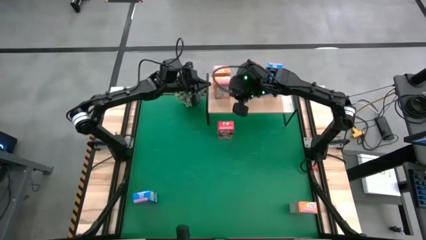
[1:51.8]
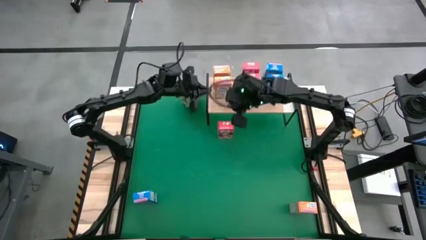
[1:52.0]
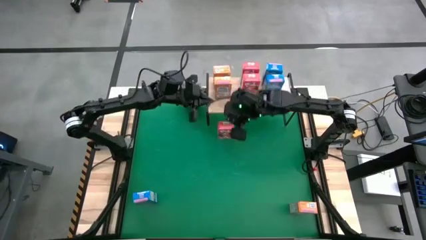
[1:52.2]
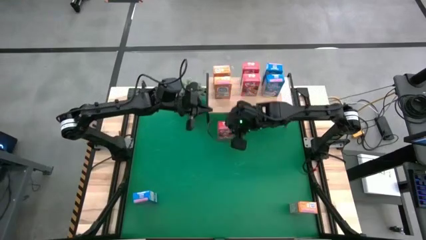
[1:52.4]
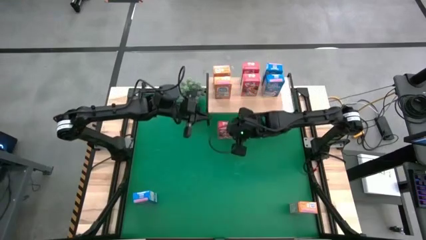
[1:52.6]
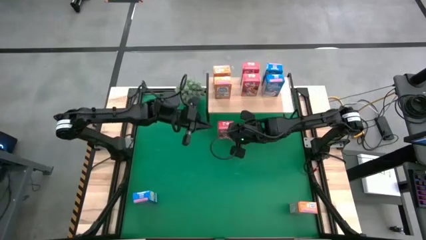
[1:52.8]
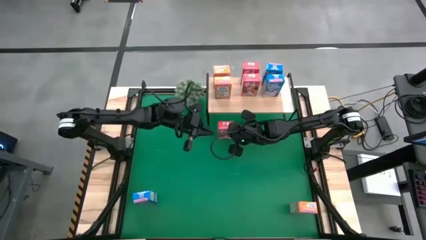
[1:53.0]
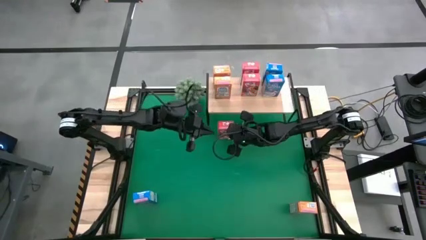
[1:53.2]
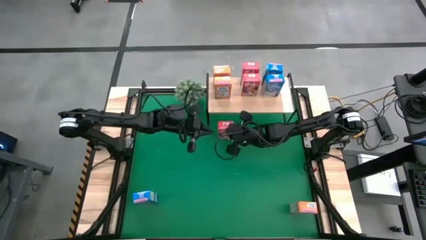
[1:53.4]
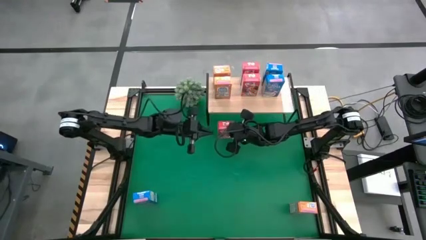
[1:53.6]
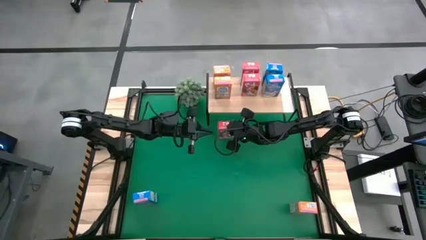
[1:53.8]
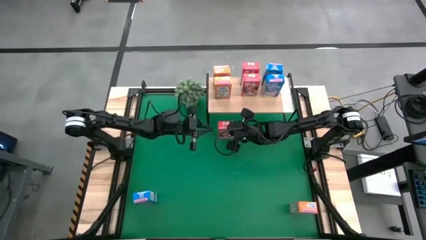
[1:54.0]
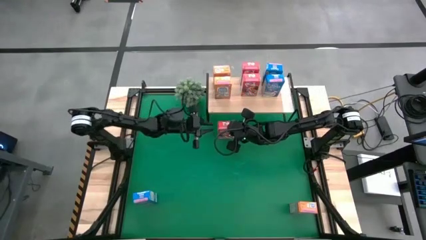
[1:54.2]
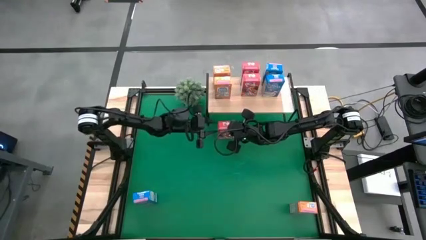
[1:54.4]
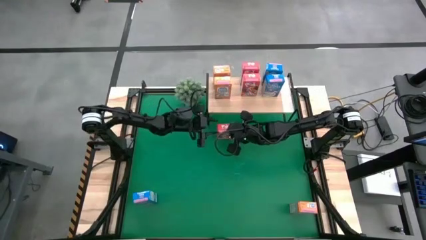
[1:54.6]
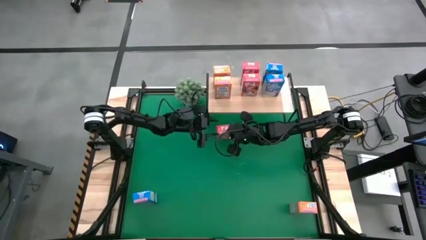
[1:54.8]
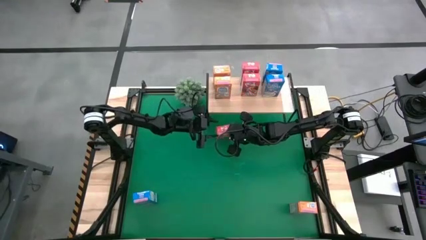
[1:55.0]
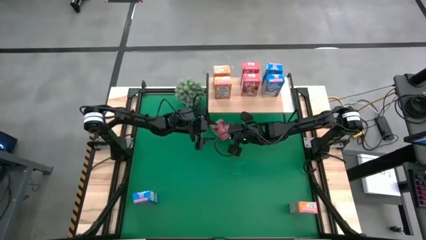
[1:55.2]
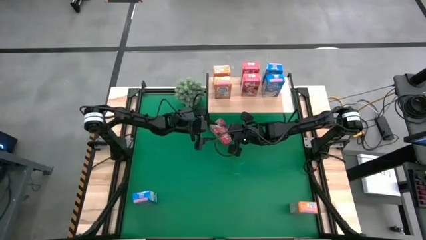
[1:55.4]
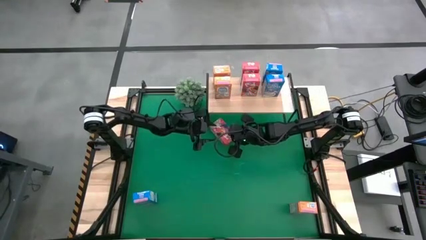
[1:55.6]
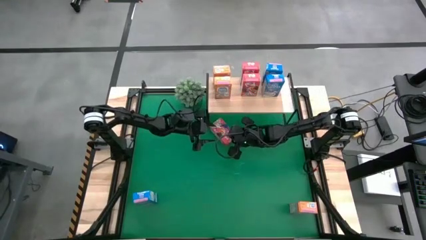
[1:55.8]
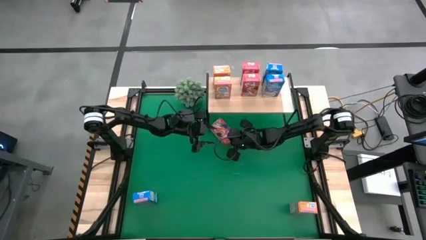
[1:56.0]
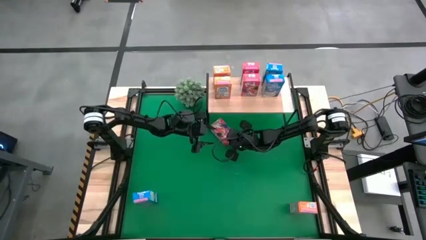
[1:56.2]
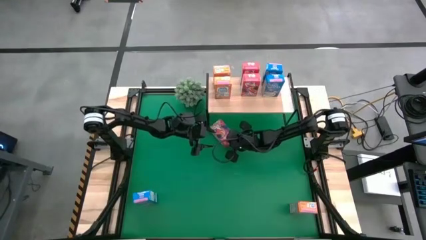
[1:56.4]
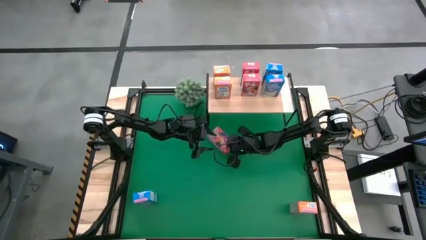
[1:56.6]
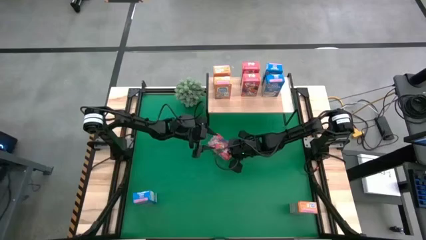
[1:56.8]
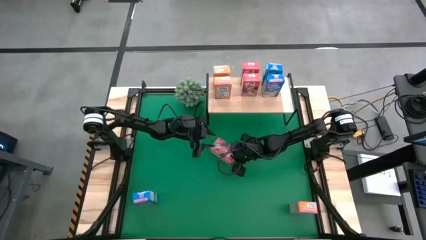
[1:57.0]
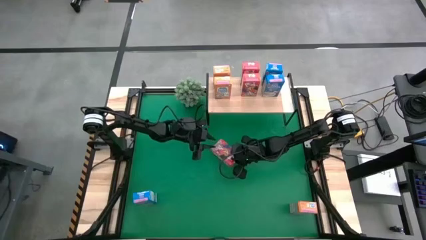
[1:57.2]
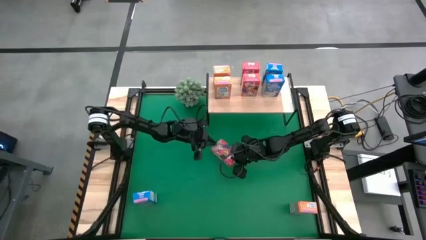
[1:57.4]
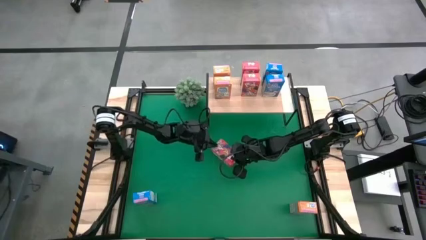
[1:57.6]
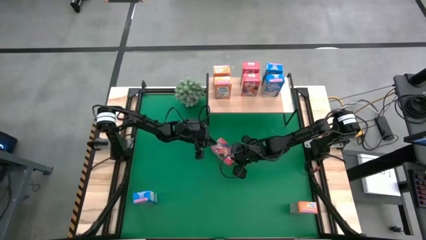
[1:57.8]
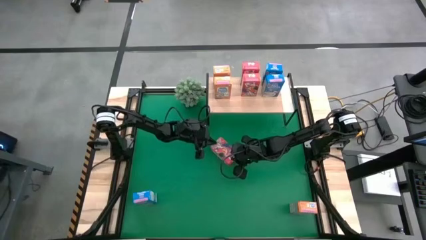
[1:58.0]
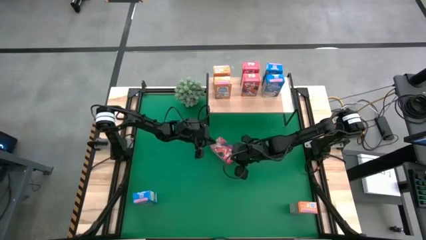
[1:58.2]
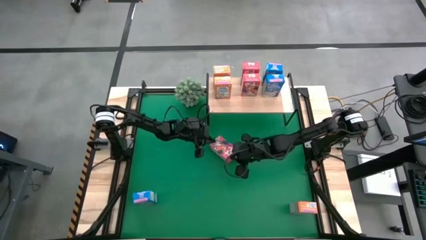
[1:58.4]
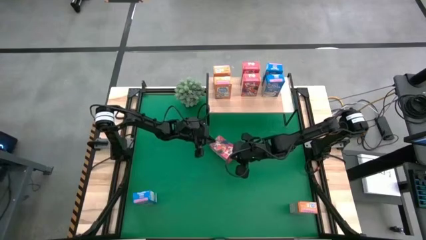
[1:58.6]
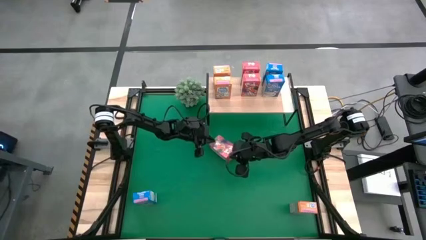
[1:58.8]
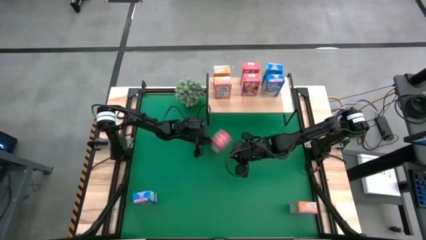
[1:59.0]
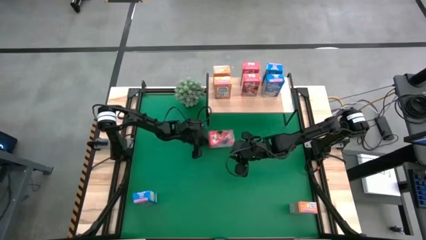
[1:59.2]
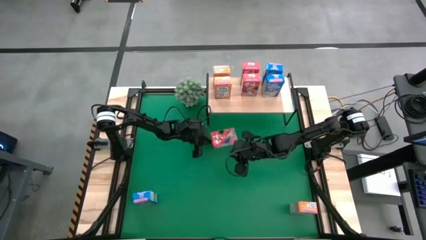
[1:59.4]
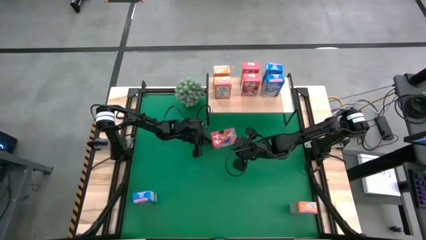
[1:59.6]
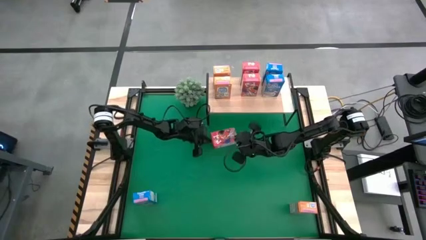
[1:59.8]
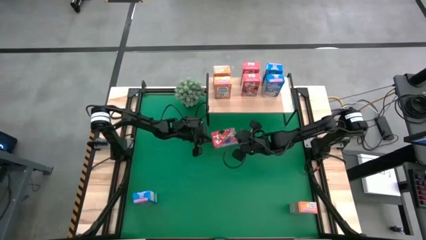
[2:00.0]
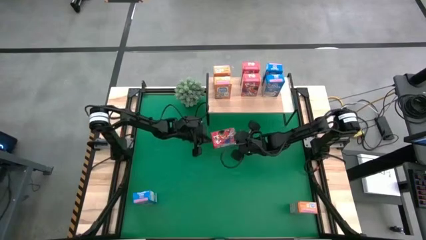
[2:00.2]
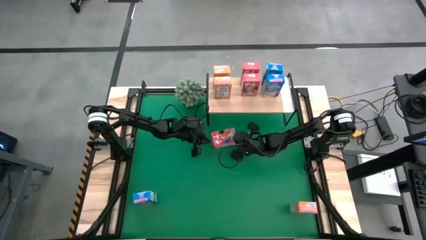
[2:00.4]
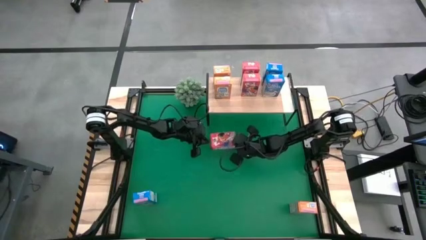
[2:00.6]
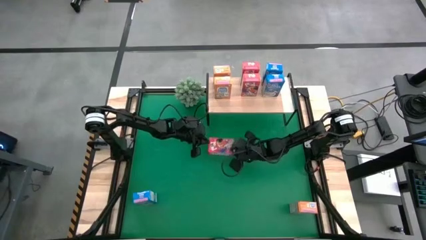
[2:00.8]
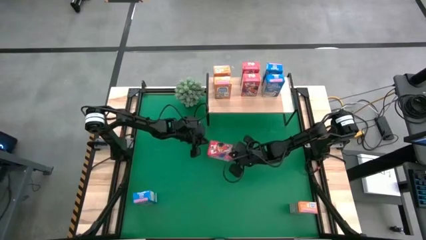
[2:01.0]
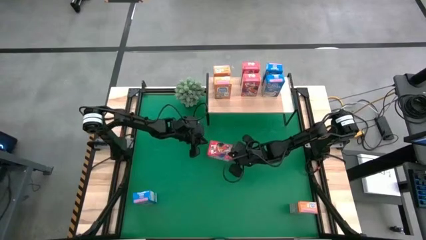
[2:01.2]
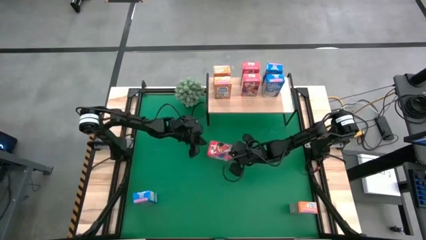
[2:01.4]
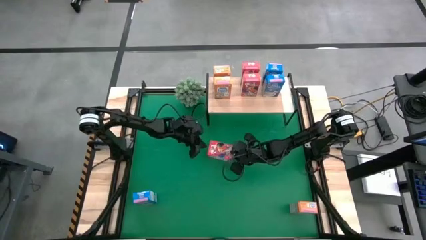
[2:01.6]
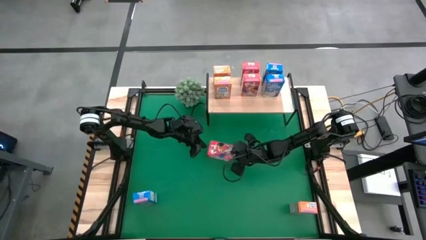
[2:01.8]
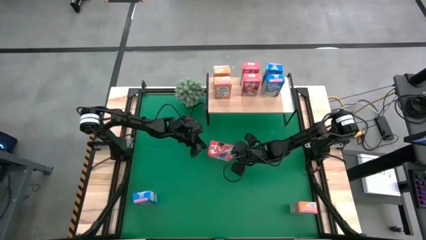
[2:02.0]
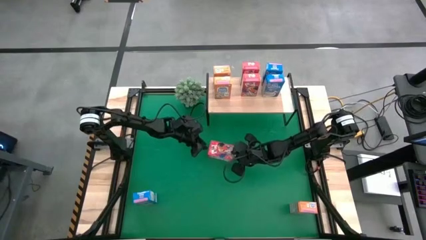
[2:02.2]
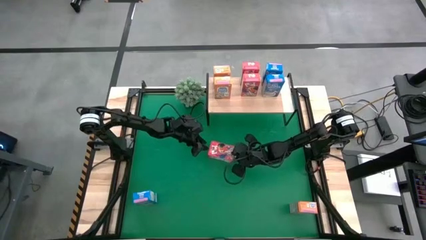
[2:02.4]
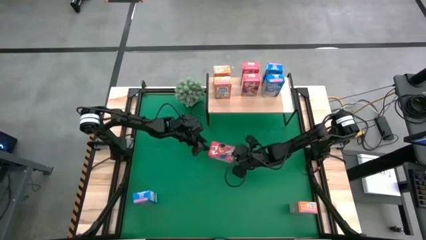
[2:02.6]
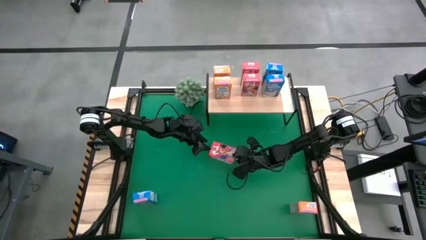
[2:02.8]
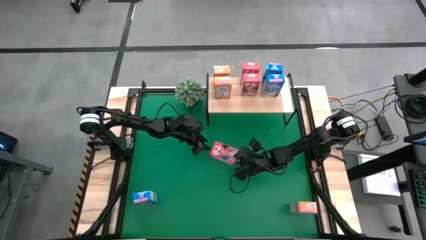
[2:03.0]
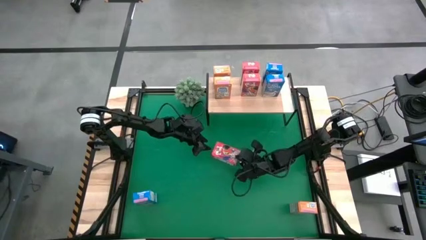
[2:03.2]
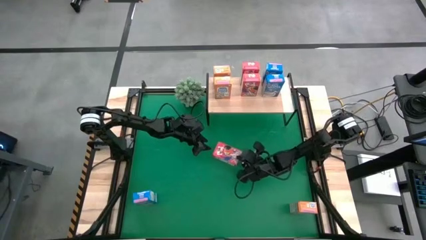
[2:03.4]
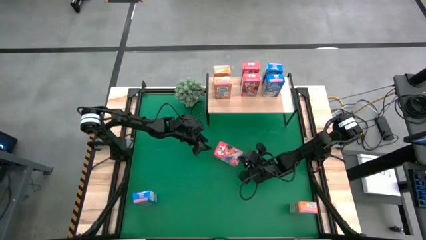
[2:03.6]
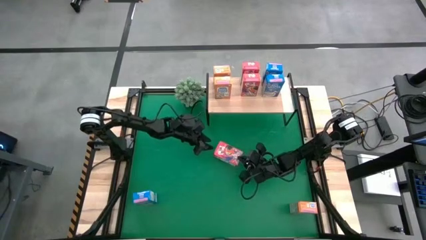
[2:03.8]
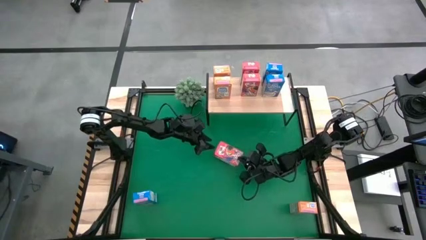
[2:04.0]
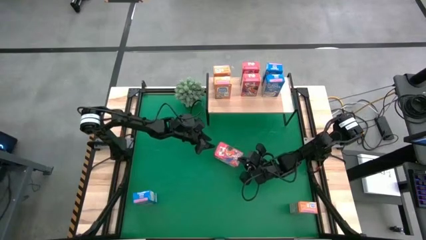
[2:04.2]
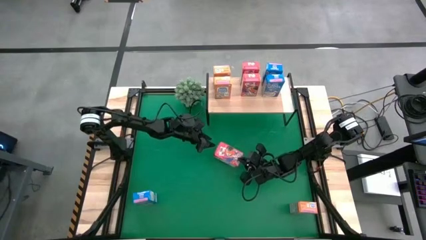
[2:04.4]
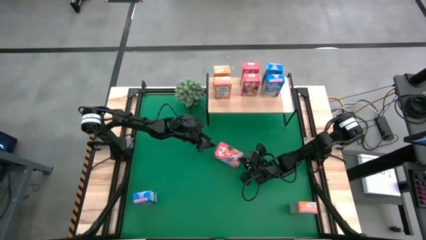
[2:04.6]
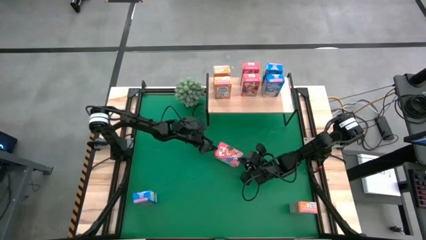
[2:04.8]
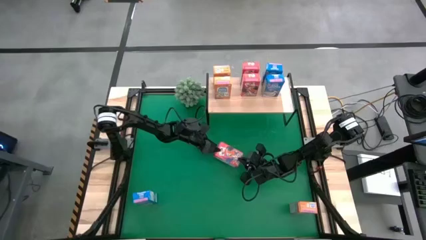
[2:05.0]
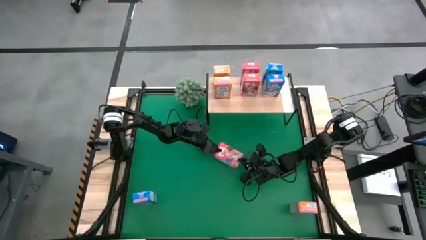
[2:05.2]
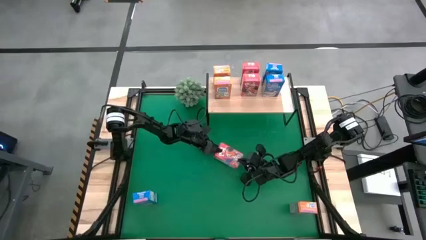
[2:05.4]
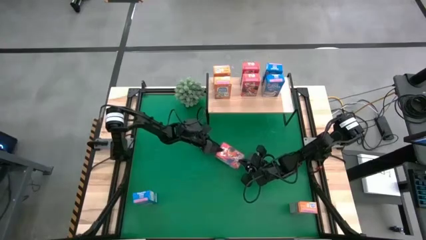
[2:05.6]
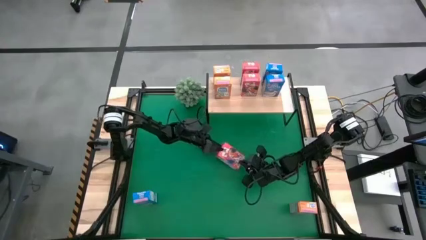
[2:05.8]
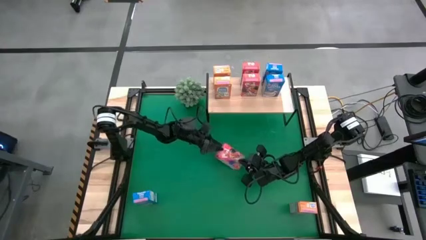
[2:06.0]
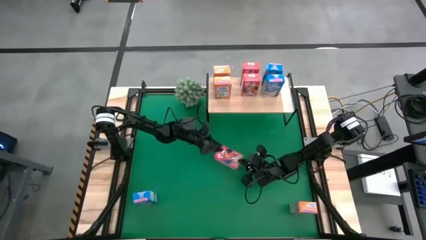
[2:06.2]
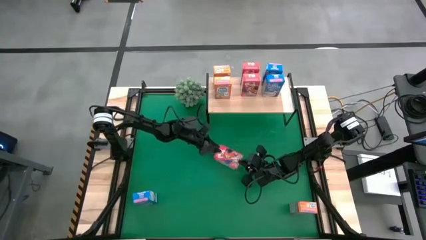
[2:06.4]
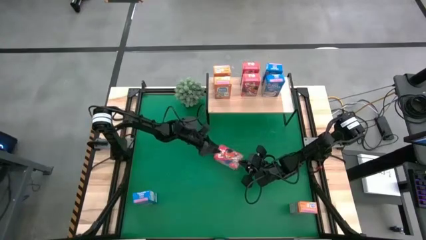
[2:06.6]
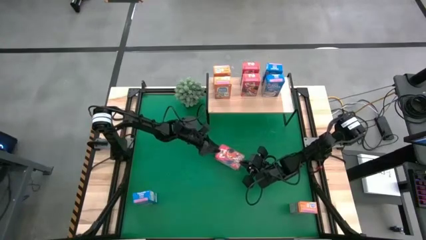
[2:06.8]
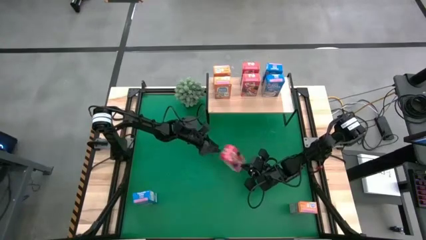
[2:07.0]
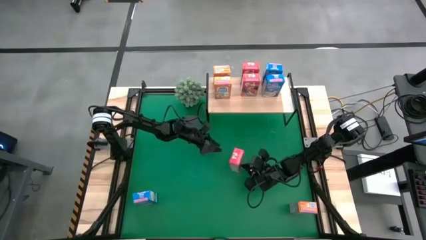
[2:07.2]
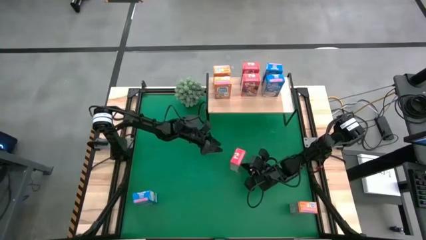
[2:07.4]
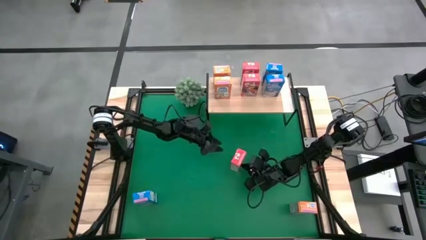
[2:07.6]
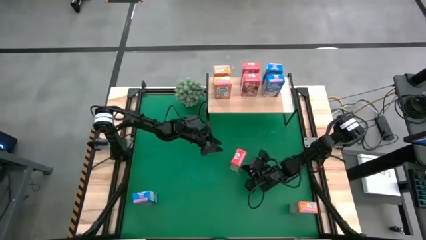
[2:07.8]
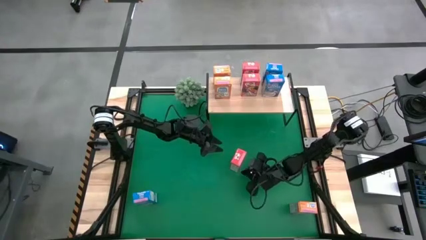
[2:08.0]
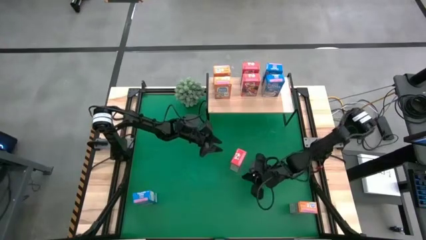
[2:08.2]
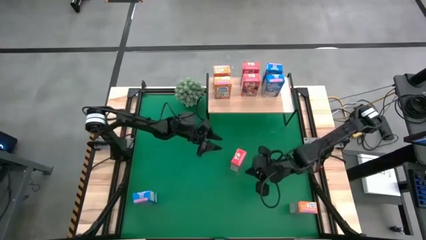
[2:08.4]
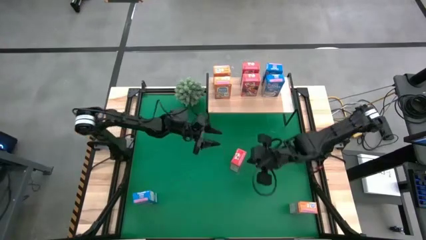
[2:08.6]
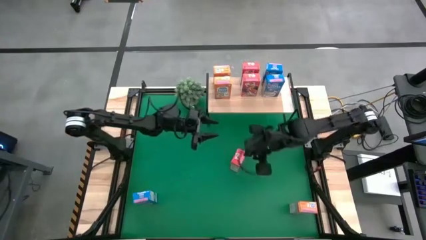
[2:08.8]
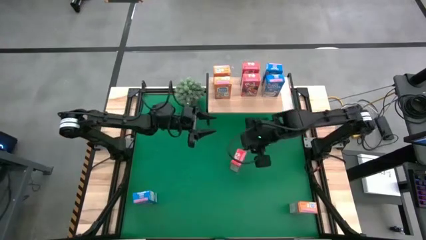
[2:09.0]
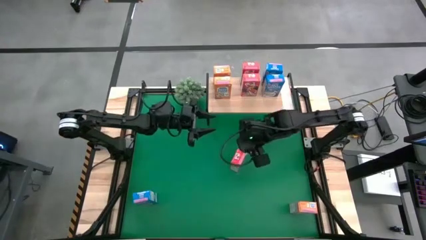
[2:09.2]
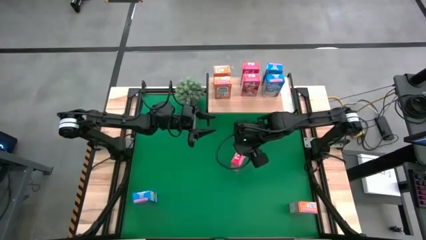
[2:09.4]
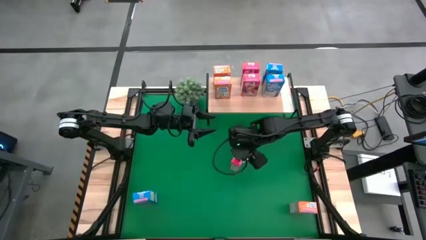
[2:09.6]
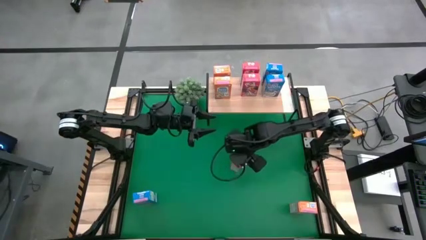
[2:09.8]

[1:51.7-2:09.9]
Task: Stack cereal on shelf
Put the red cereal box on the shelf aligned with the other red cereal box
